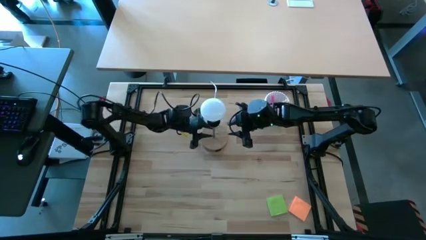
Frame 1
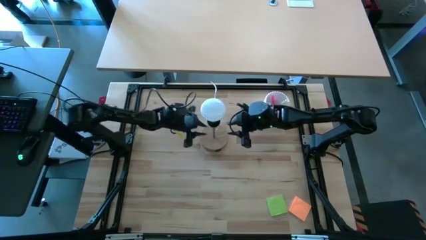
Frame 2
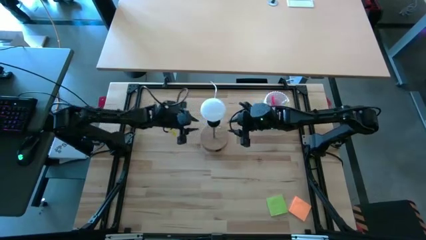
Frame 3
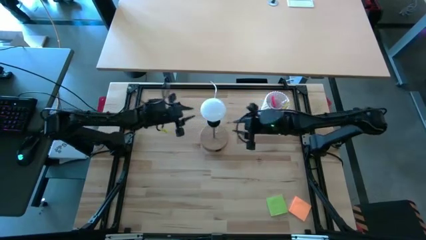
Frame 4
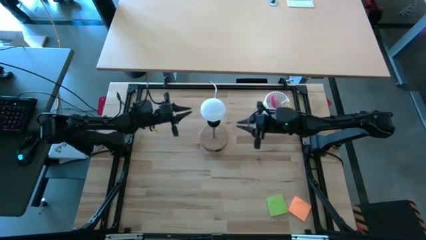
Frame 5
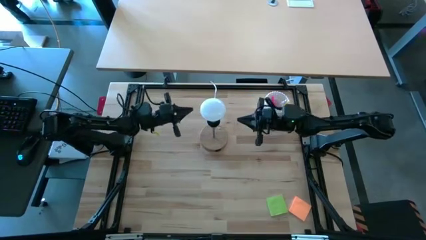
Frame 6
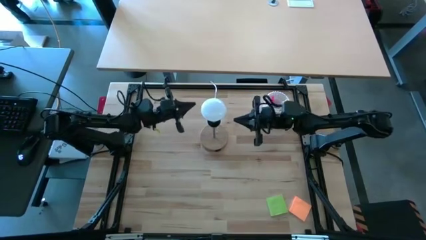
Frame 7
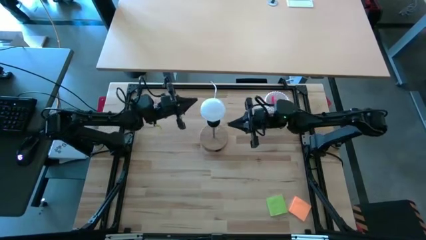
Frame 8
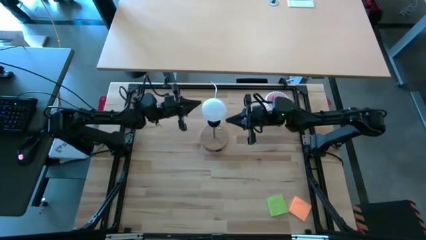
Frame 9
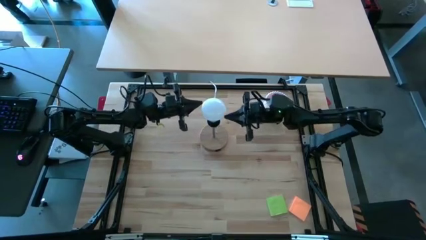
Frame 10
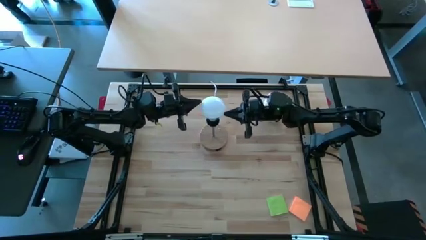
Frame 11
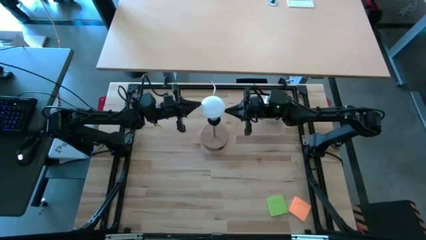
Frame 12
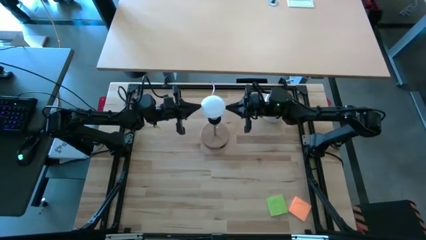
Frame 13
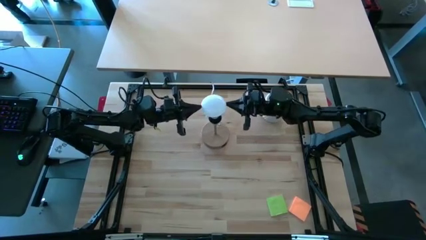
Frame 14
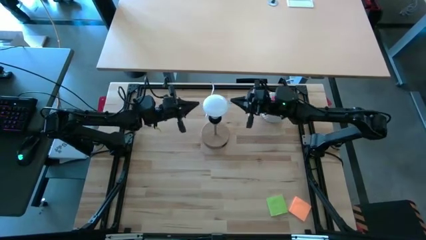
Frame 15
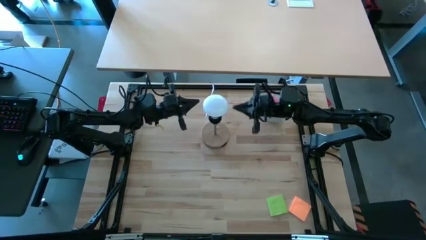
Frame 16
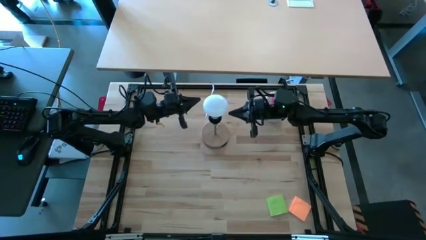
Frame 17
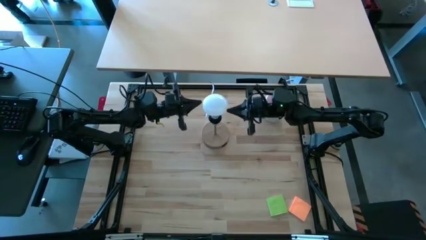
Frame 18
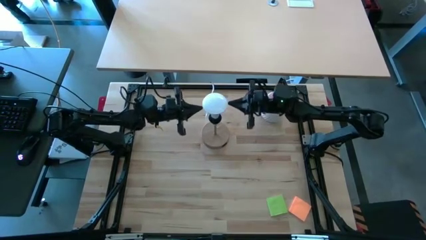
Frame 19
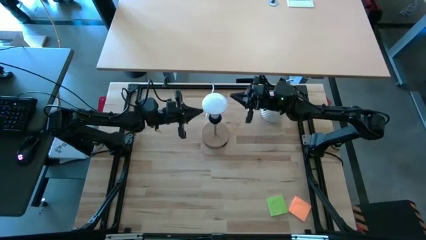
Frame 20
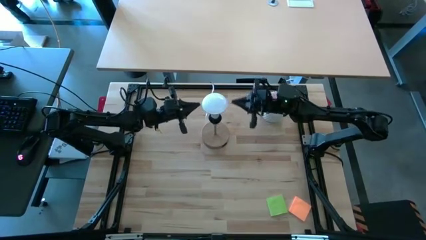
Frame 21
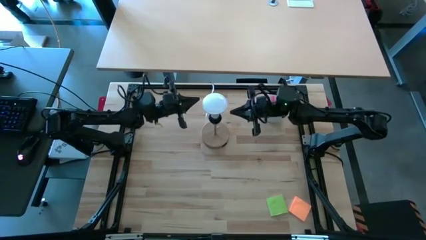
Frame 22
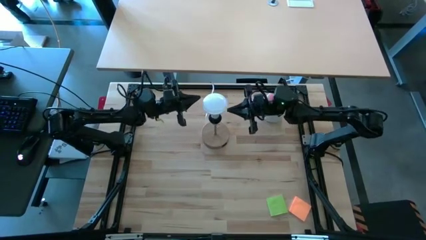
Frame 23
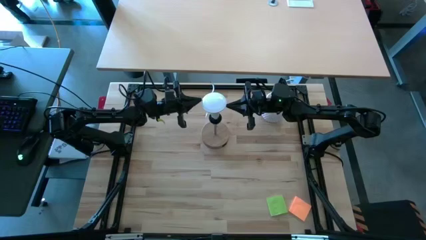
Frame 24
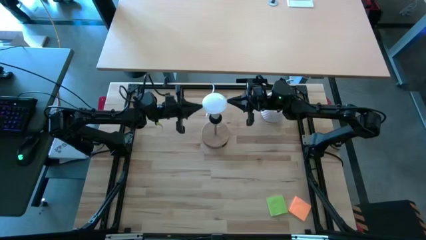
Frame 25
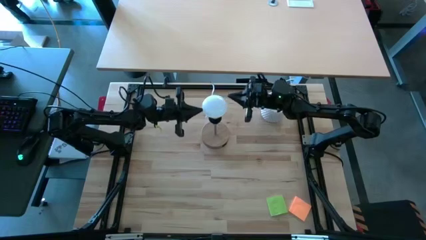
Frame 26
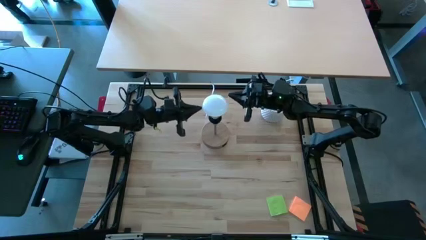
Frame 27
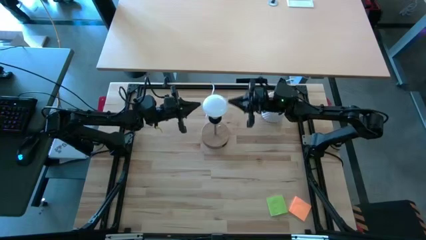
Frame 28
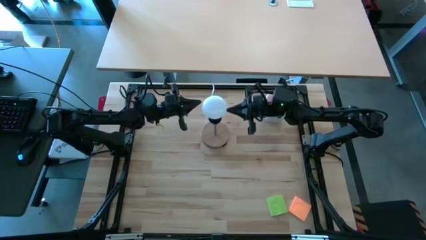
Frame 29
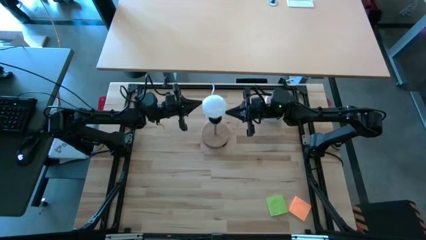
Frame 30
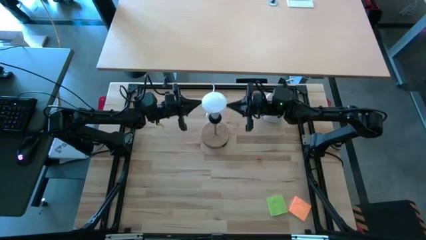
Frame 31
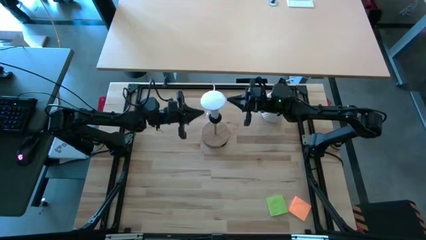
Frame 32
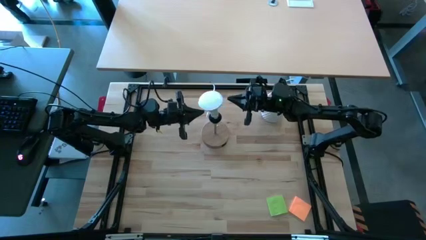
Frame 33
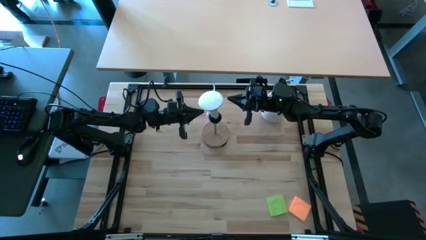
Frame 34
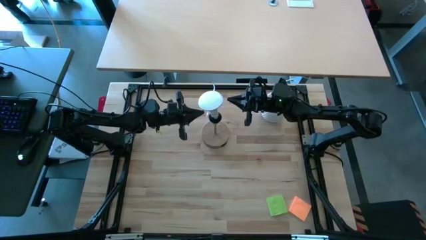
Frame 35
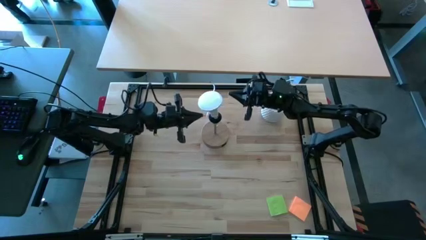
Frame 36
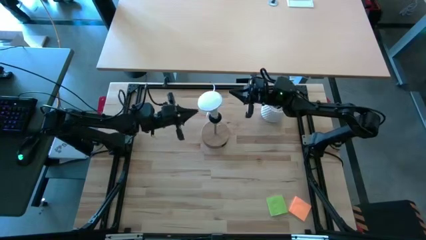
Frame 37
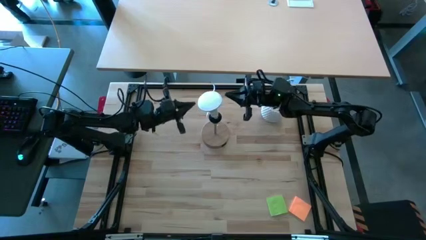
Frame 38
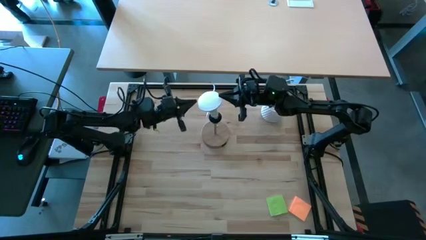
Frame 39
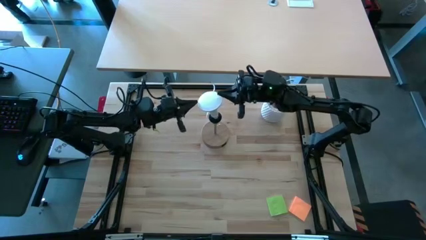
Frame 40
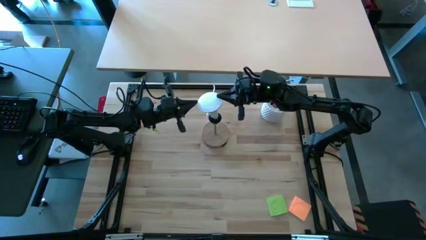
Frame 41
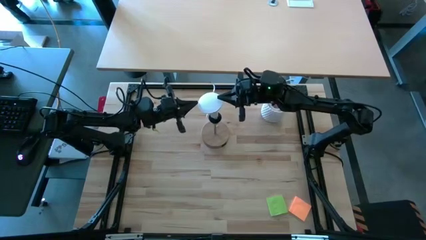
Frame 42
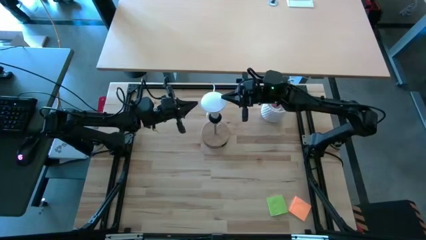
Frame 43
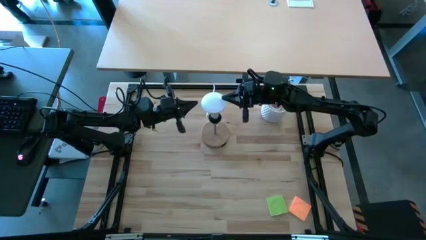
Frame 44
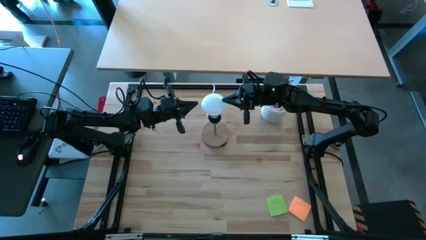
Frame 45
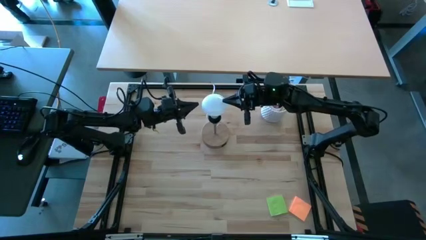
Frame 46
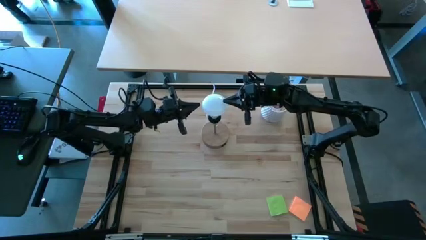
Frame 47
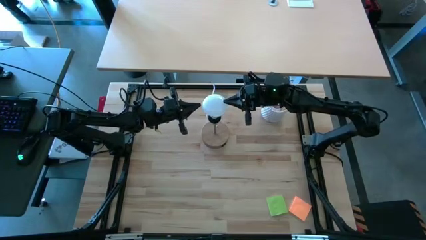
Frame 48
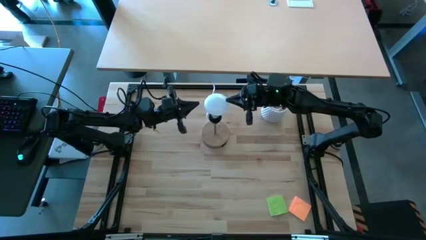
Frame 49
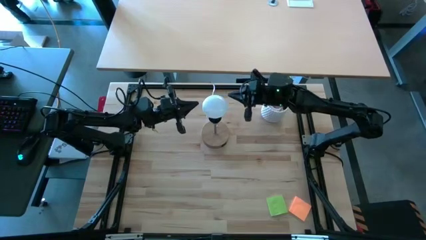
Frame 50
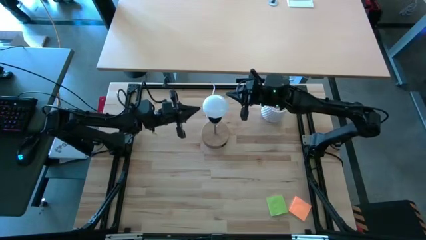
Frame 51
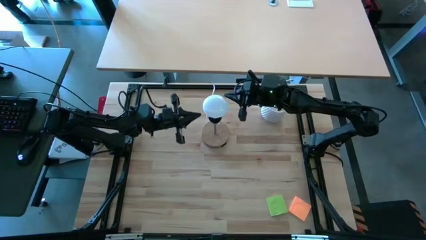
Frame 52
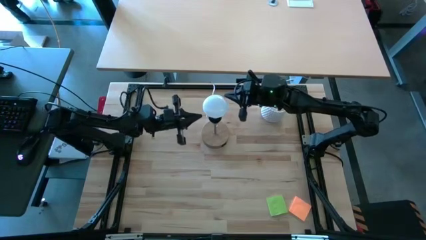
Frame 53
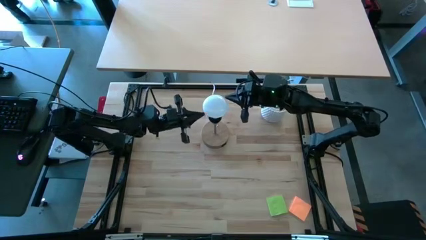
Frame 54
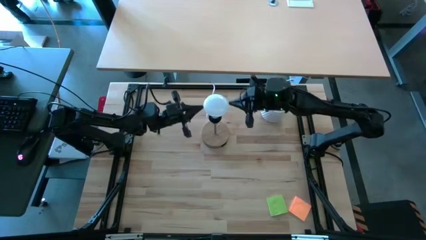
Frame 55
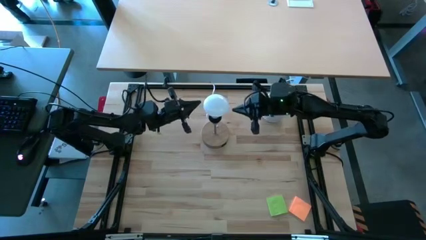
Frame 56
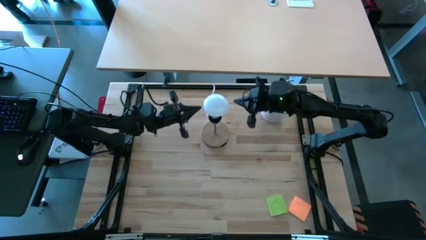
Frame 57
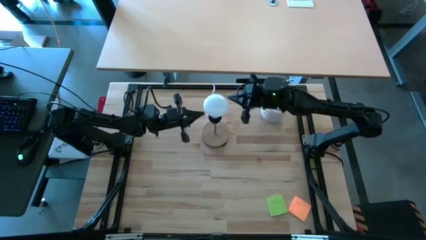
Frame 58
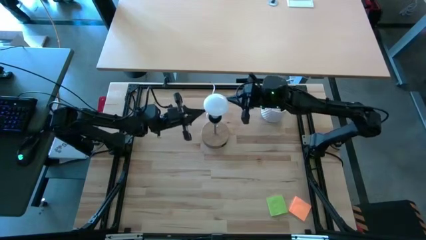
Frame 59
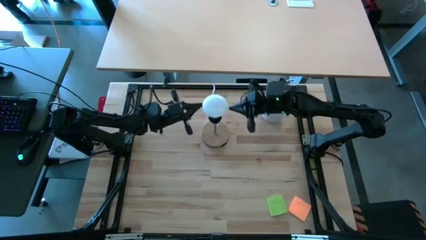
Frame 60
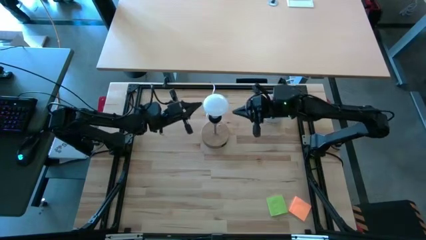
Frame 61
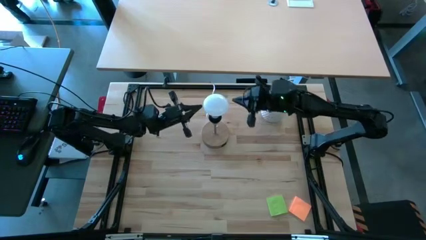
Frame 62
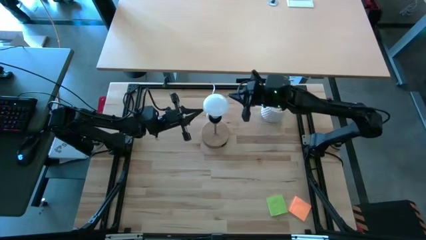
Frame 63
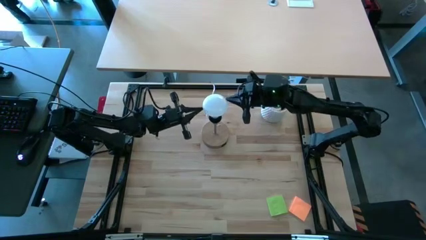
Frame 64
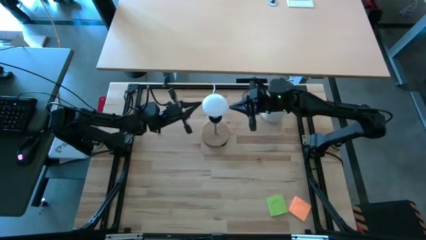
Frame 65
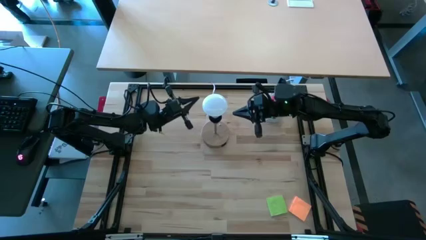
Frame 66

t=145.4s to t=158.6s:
Task: Screw lightbulb
Insert the lightbulb into the lamp

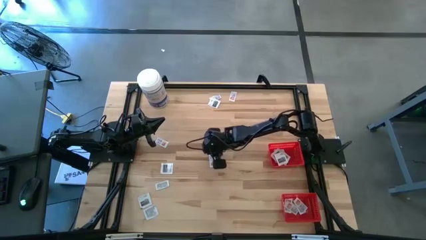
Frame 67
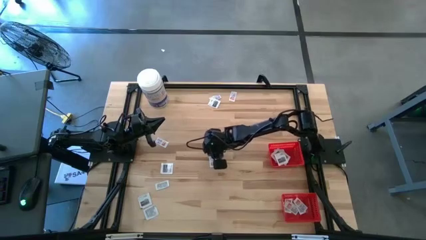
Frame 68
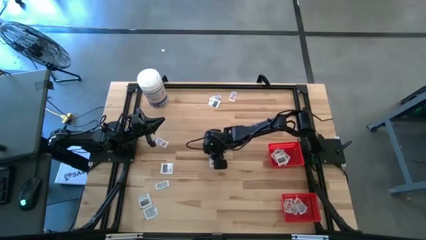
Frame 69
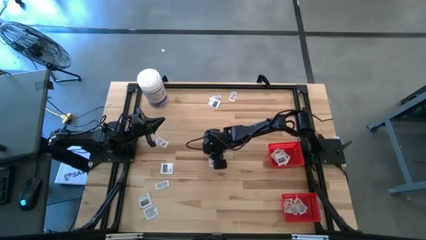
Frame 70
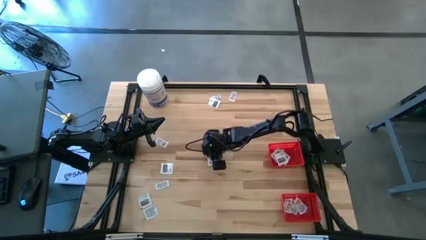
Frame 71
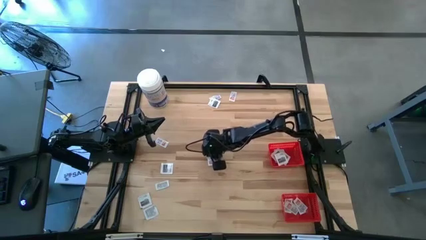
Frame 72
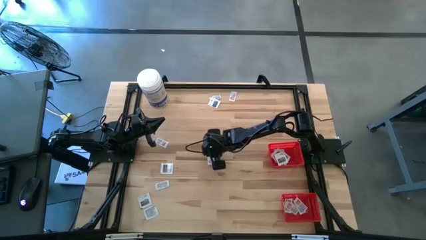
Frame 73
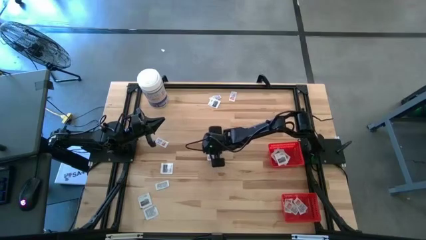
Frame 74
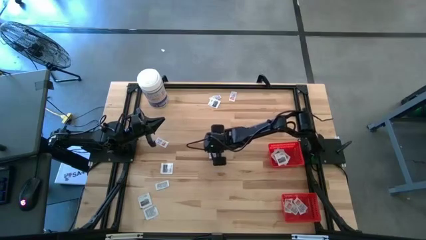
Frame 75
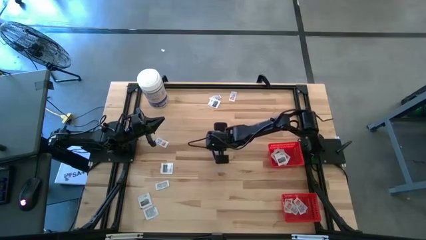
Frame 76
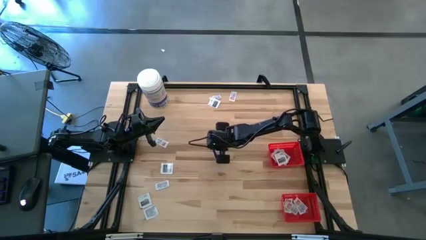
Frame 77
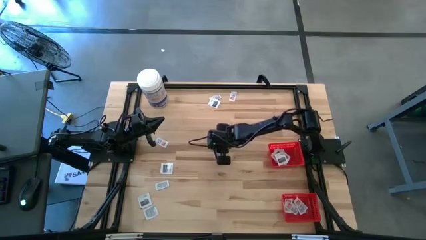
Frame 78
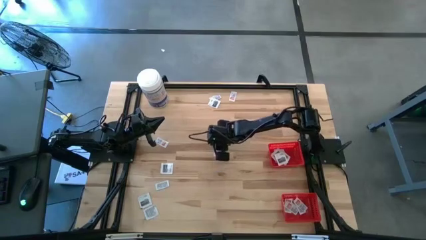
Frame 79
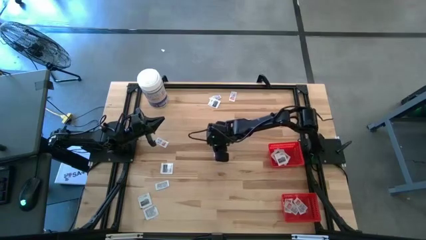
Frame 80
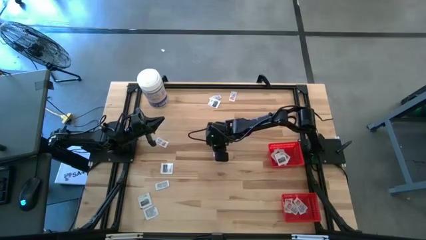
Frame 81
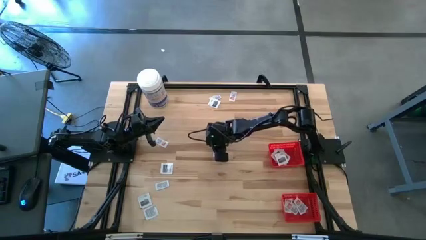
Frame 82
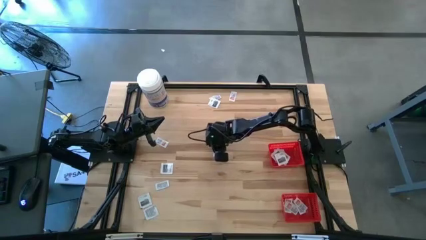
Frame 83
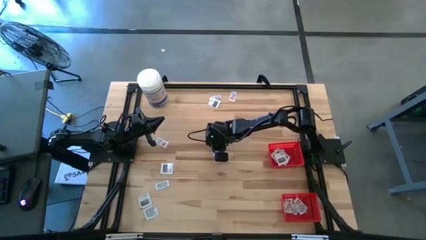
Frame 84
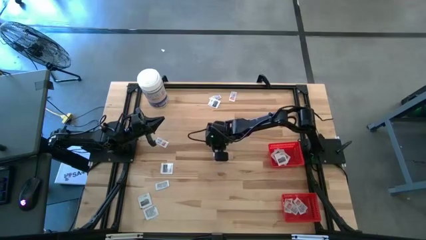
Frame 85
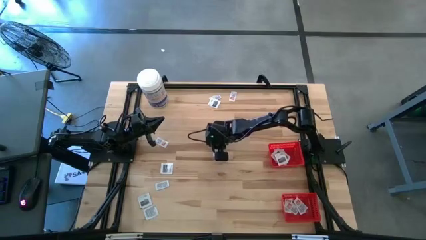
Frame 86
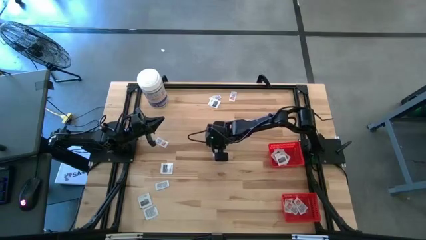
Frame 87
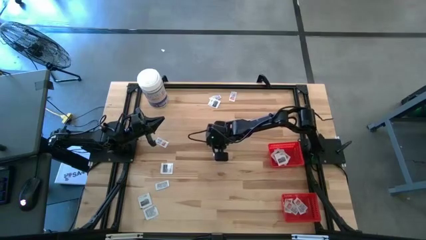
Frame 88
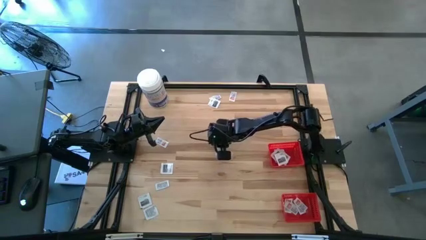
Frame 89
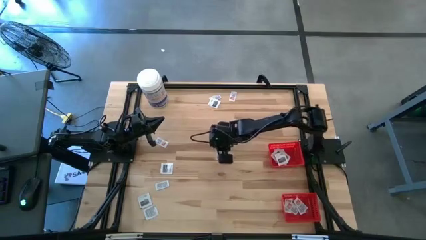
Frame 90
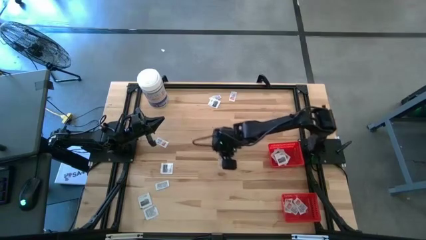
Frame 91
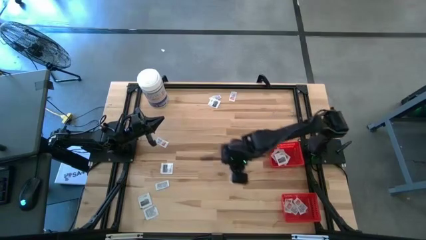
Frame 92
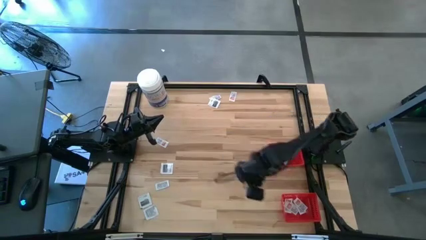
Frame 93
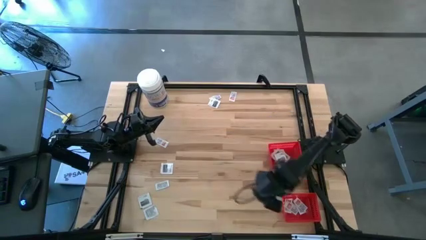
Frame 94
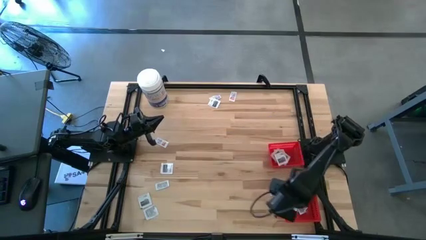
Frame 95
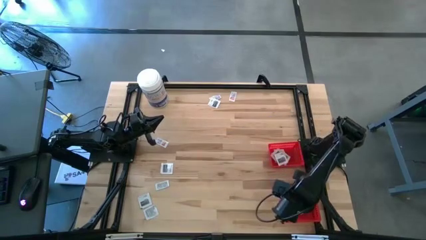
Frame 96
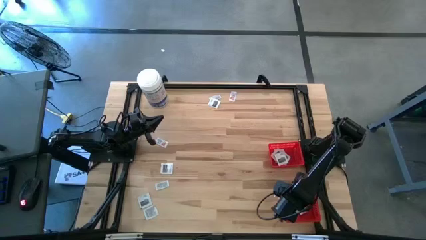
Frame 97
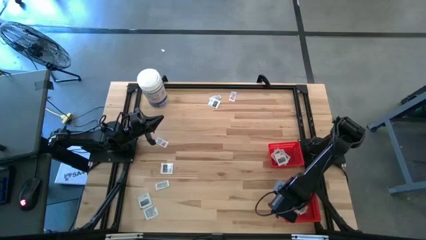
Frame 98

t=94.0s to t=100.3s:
Task: Pick & Place First Aid Supplies
Put the orange ointment pack into the bottom red basket
